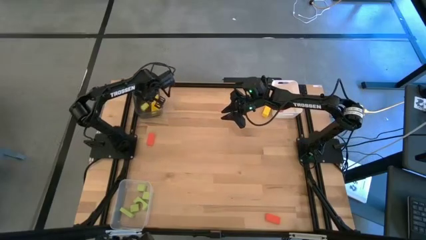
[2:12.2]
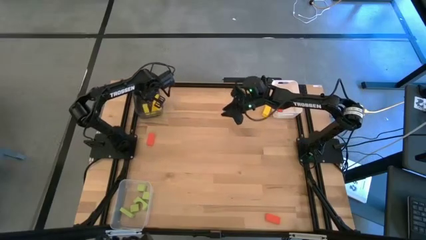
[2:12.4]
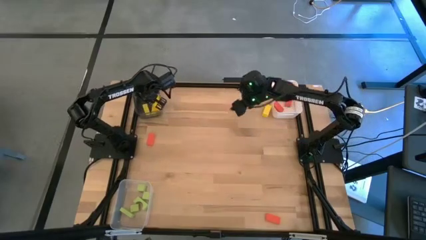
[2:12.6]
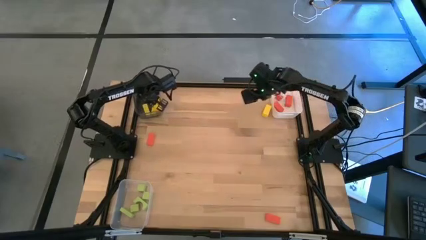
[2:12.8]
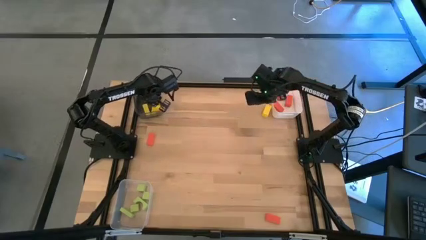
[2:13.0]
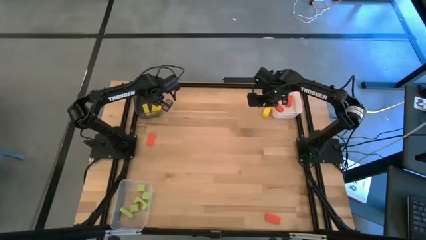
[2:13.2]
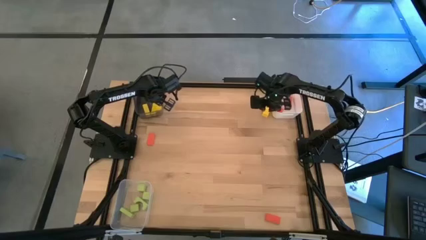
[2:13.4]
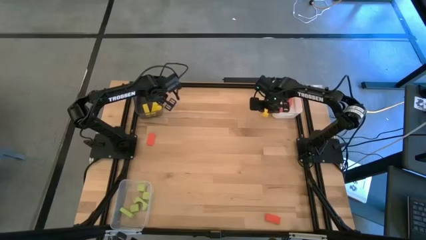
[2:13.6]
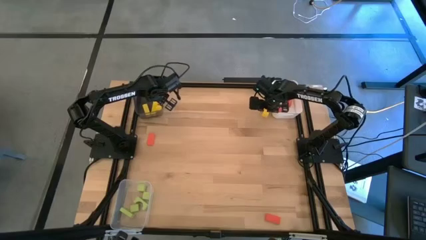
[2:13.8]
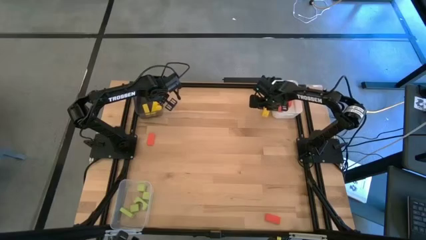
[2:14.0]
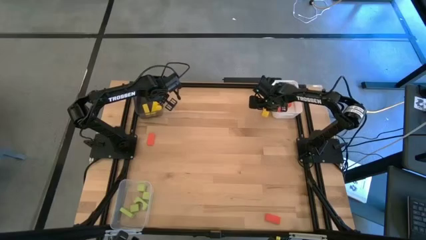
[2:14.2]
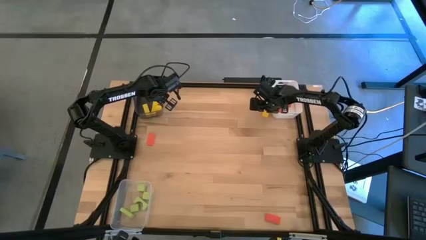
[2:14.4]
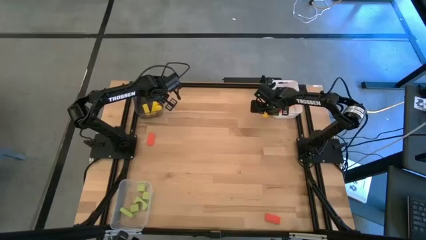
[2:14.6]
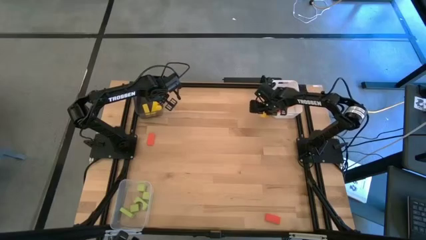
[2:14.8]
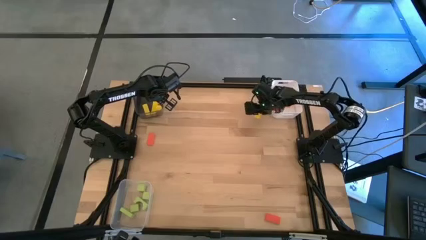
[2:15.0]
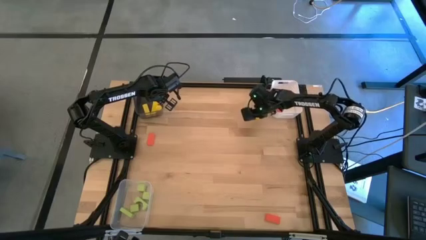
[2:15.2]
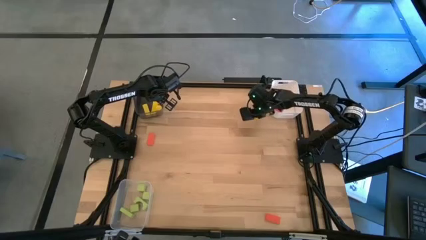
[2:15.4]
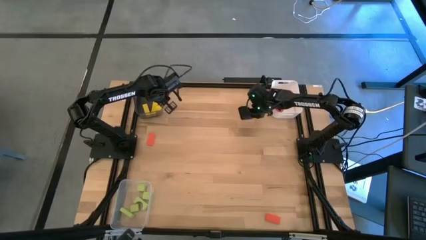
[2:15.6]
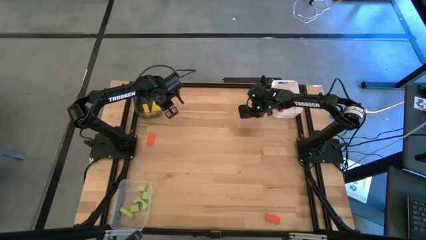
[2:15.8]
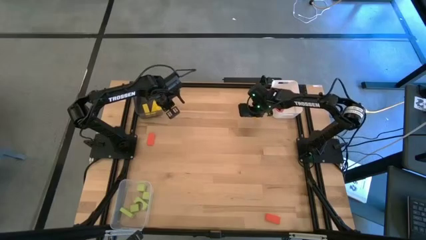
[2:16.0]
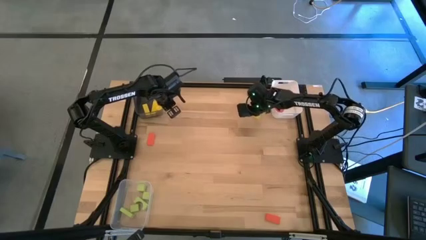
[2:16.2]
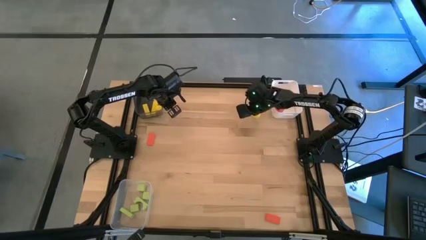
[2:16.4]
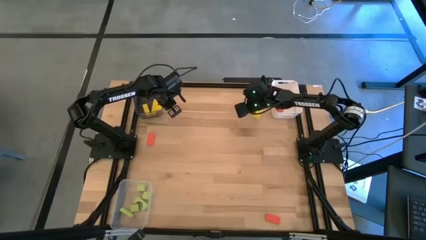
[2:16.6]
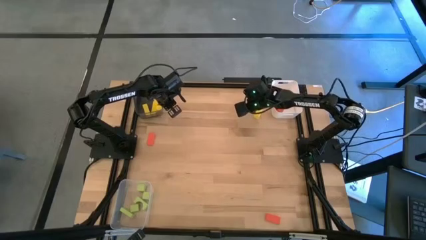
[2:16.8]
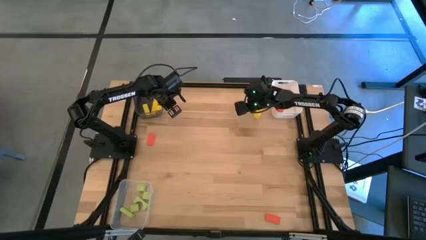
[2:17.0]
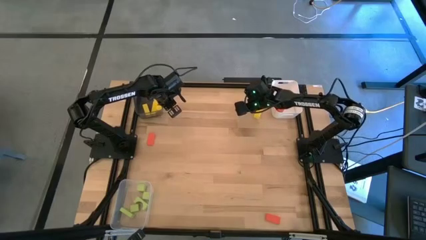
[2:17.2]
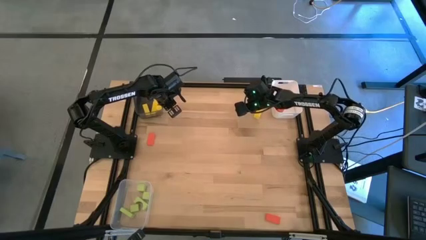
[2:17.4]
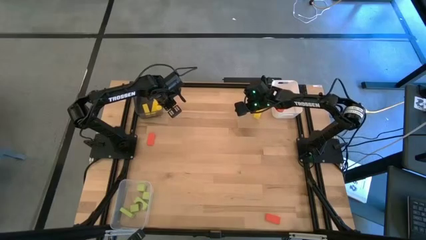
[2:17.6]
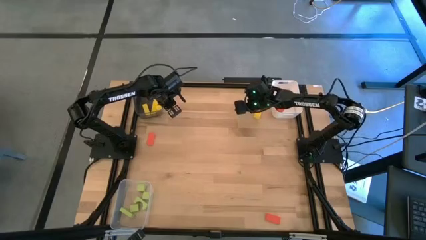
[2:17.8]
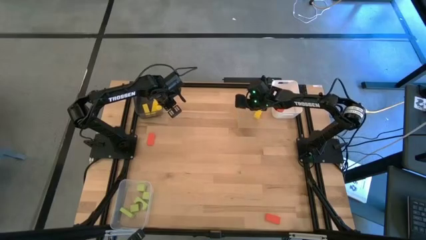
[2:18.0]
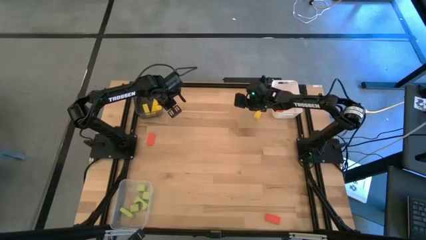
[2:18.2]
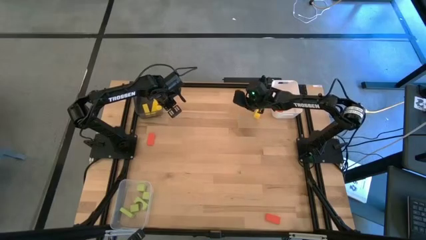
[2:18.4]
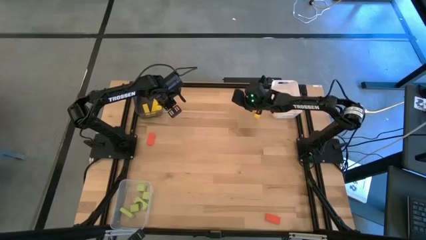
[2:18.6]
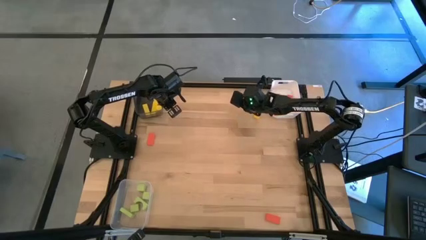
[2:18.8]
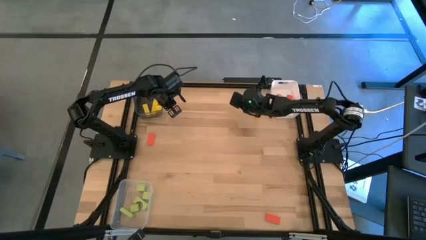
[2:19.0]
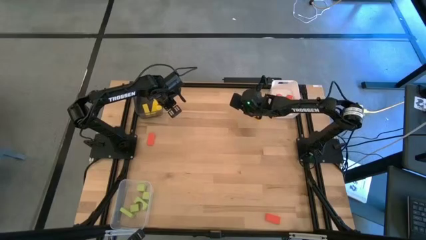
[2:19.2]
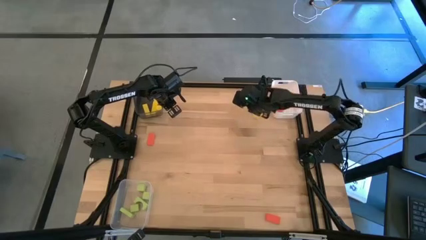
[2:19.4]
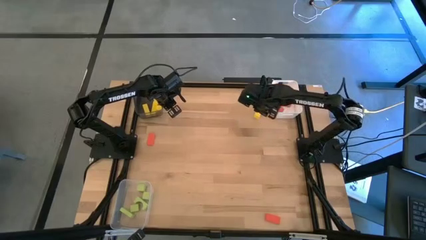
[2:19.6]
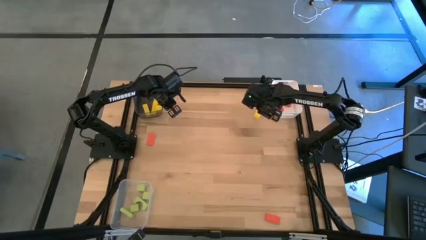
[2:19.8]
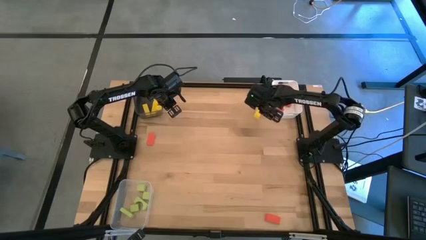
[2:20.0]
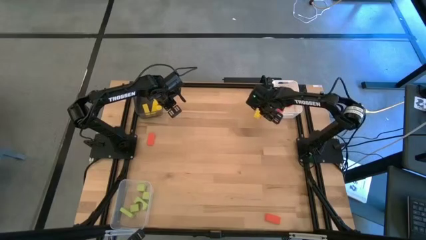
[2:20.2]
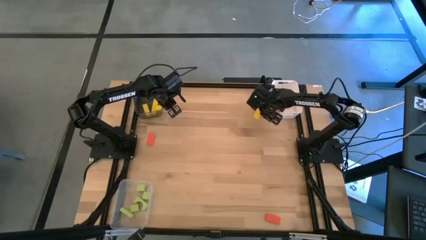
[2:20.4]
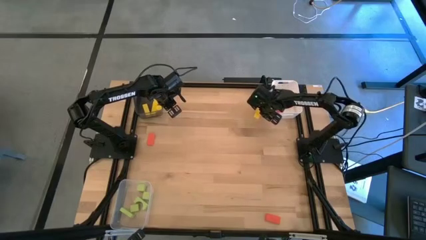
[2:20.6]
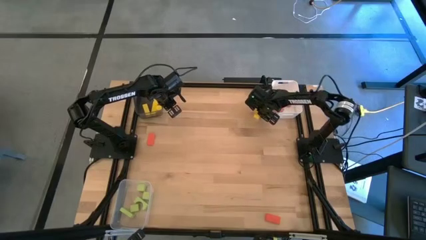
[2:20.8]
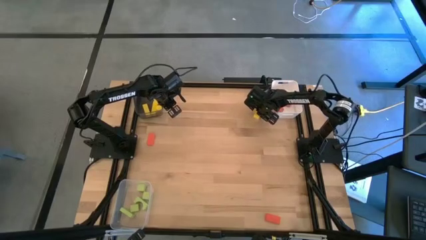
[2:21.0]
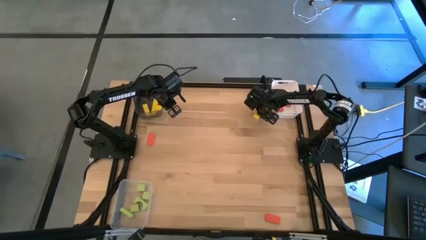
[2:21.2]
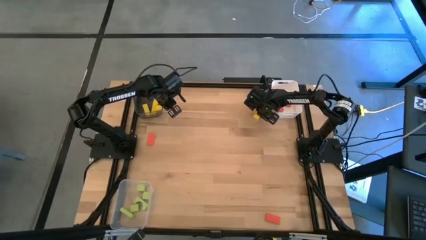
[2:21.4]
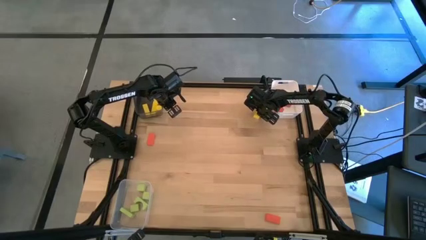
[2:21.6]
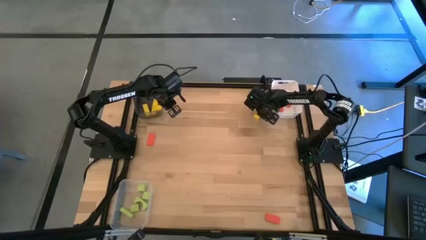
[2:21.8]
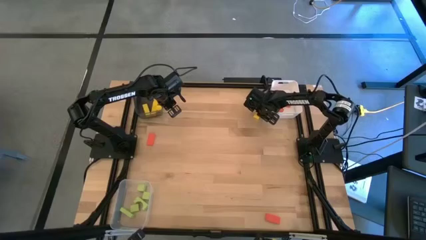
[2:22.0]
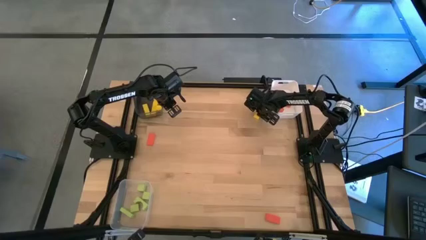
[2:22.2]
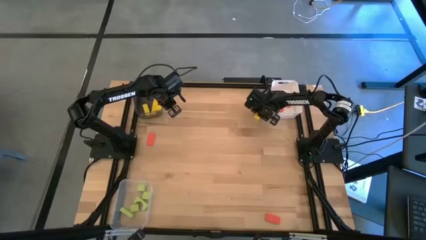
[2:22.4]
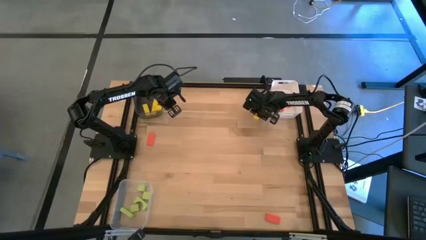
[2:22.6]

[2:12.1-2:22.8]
Task: Sort & place blocks by color
Put the yellow block into the black bin

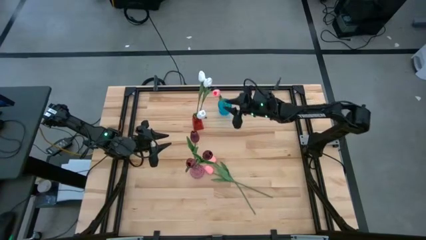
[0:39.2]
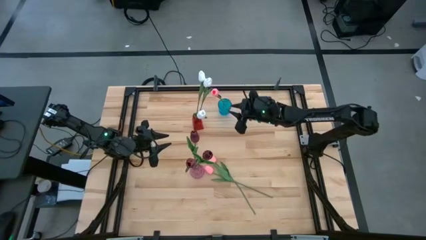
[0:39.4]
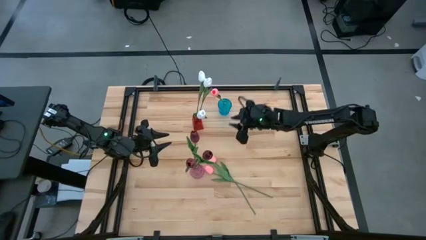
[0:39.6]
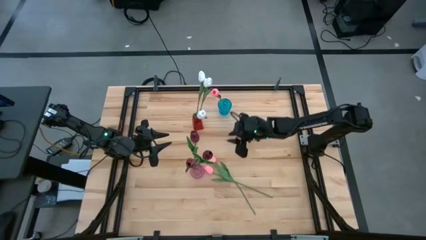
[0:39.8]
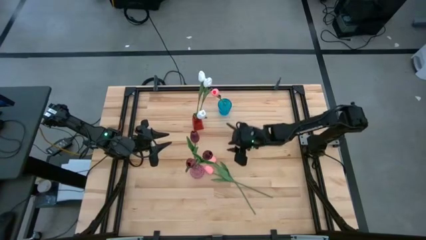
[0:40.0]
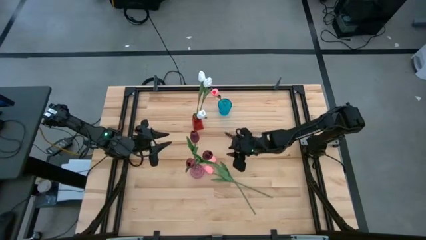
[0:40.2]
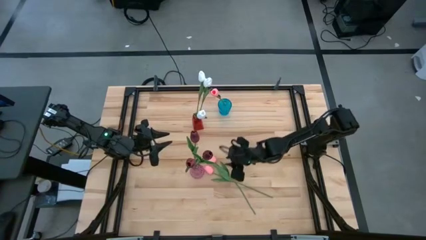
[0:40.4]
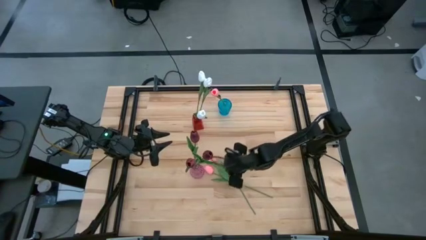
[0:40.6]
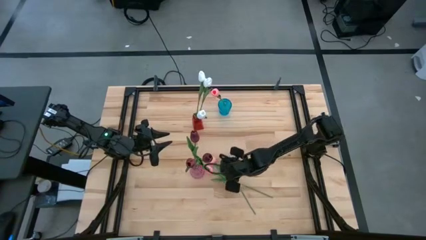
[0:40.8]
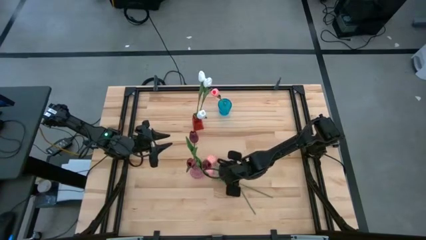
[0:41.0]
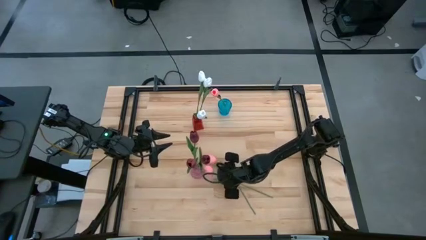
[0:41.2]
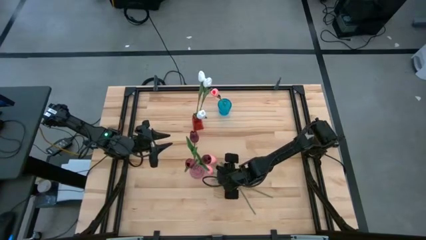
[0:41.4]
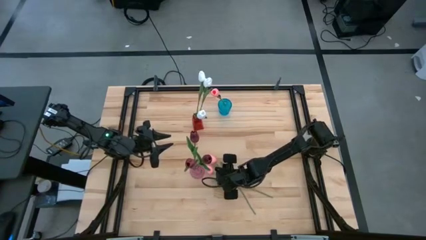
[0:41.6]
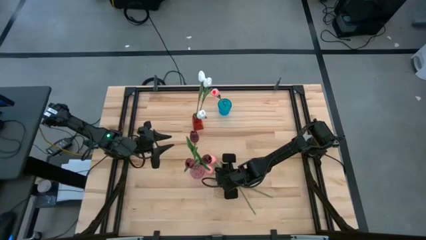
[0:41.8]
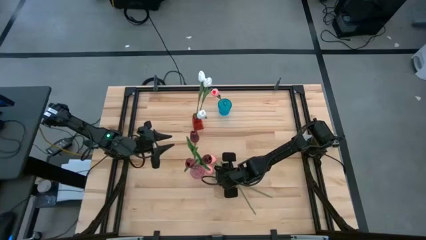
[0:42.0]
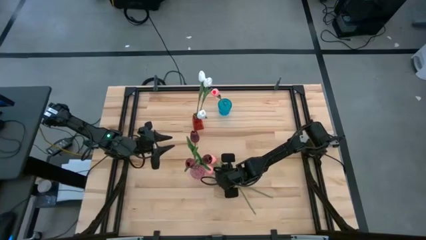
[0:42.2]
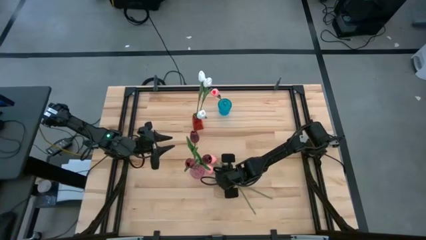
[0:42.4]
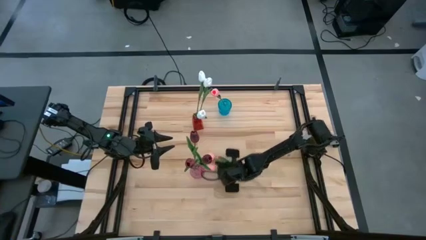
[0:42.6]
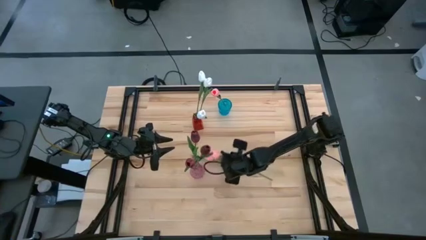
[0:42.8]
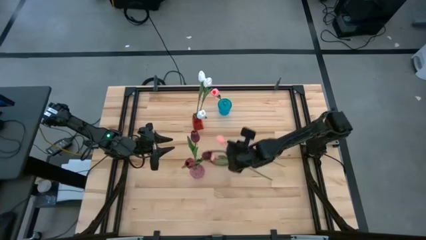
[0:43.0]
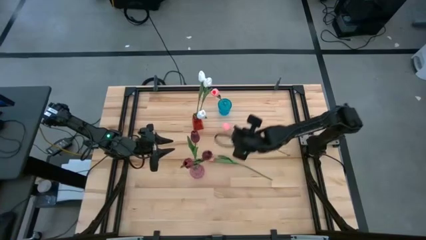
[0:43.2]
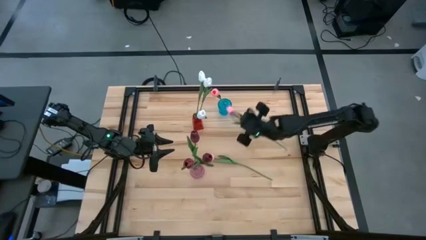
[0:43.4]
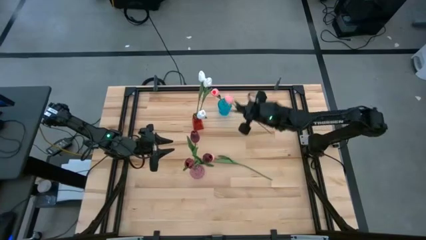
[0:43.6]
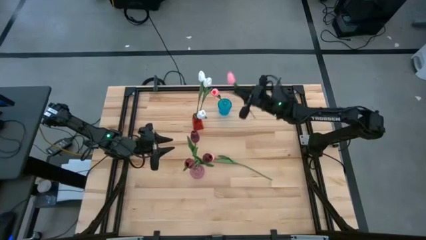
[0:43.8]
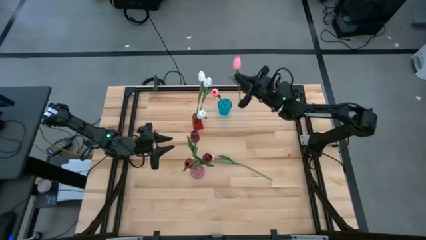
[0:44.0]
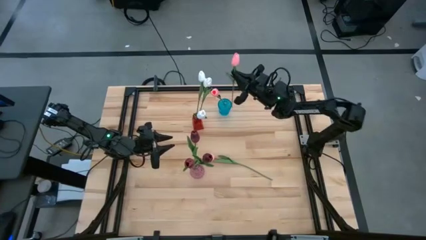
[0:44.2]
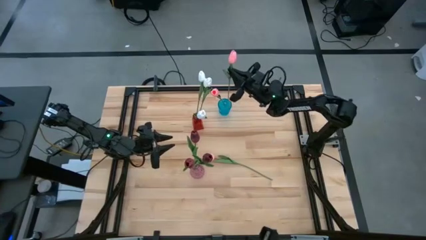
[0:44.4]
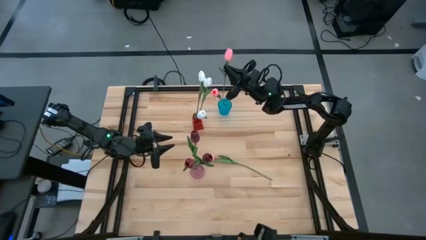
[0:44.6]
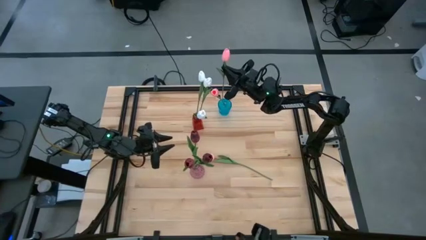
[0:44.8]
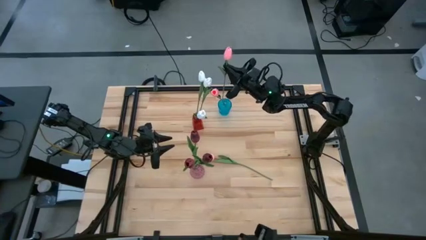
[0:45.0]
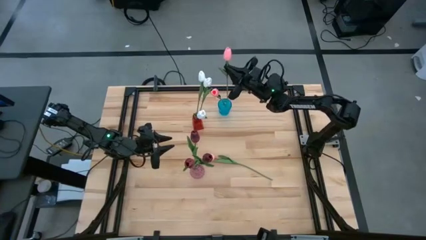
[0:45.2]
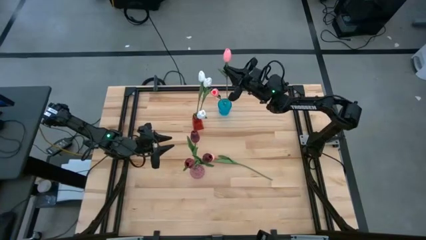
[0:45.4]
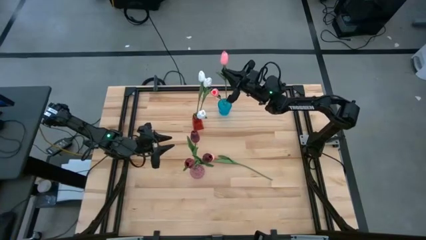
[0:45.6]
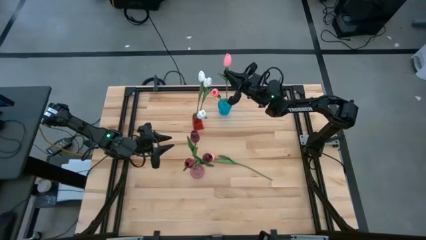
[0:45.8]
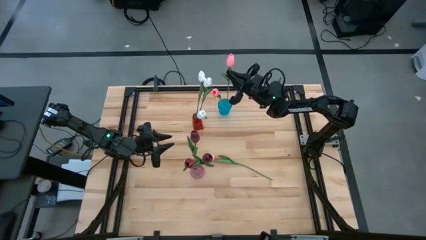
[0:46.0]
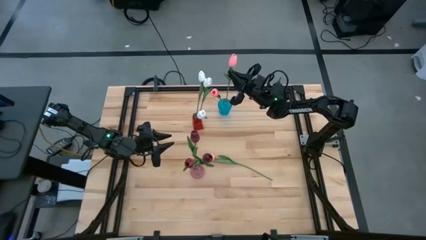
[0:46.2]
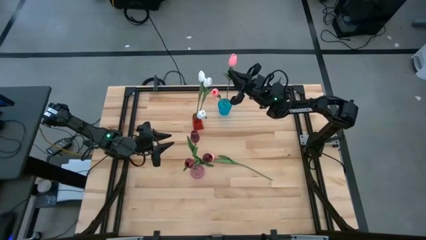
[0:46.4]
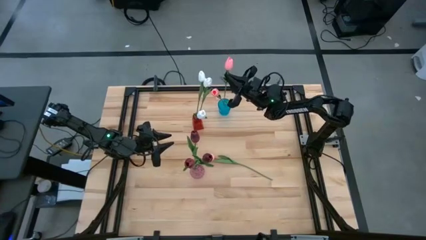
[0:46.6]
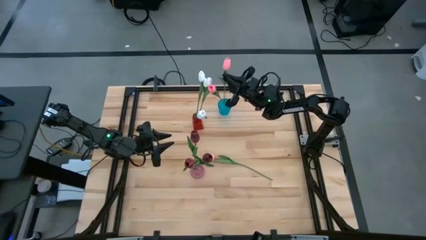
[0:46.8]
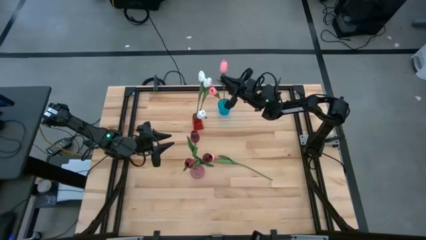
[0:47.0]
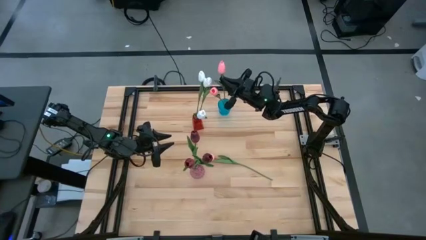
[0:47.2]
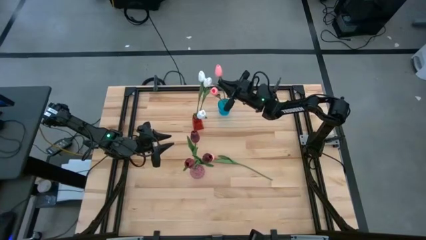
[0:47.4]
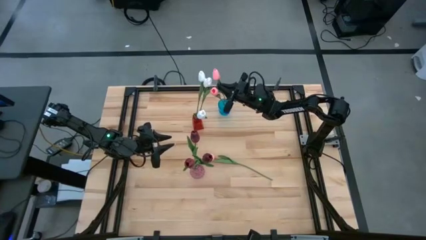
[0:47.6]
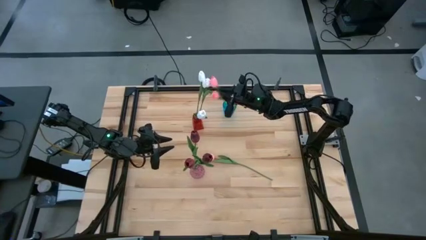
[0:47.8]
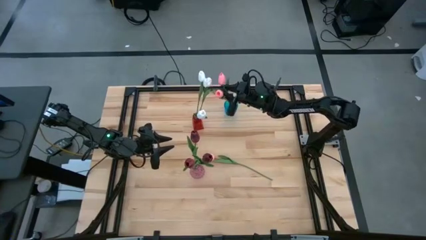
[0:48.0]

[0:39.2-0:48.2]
Task: Sort flowers into vase by color
Put the bottom pink tulip into the blue flower vase
